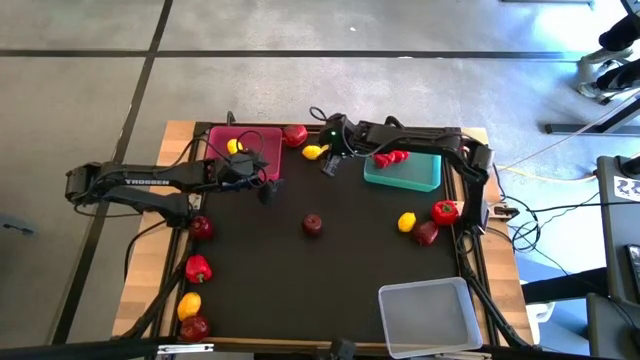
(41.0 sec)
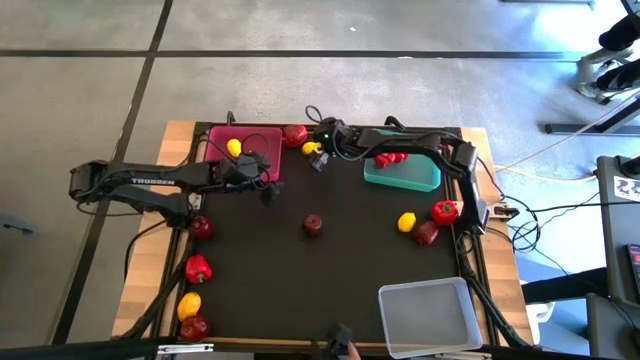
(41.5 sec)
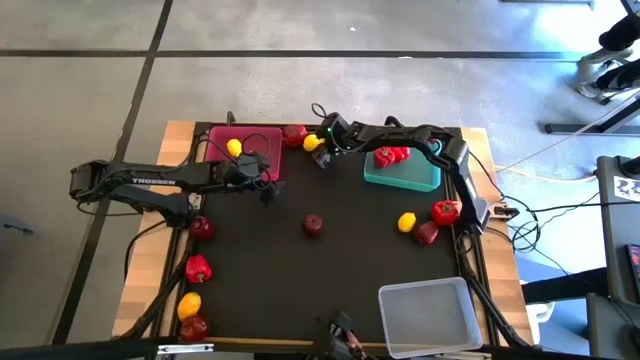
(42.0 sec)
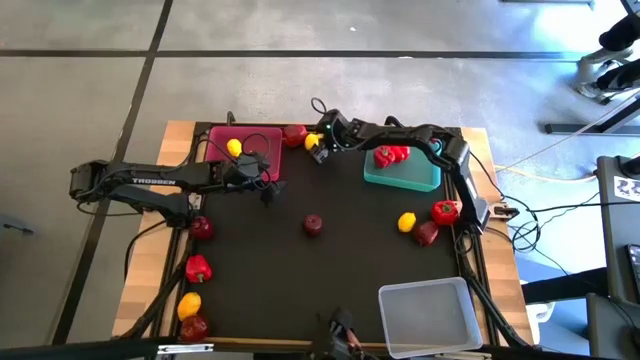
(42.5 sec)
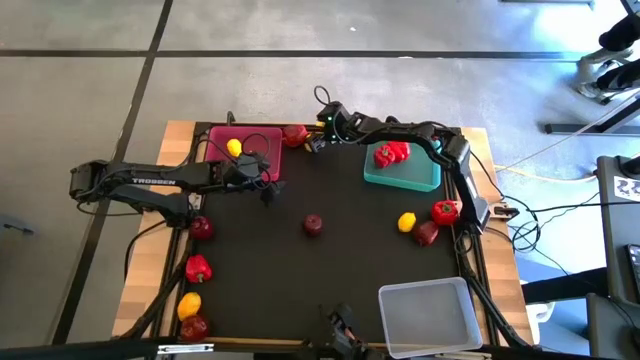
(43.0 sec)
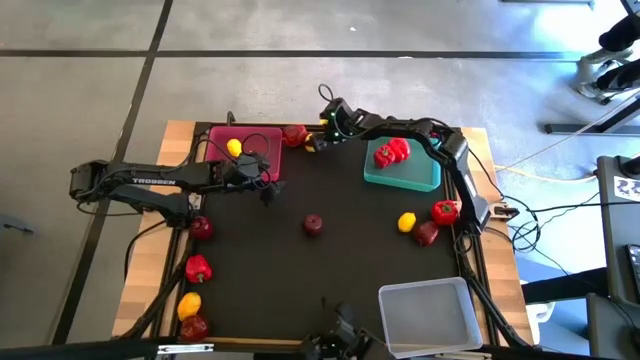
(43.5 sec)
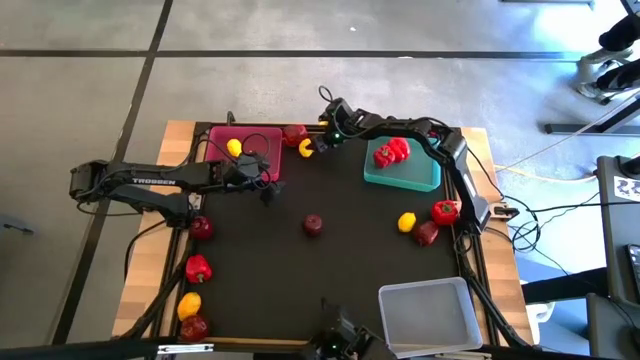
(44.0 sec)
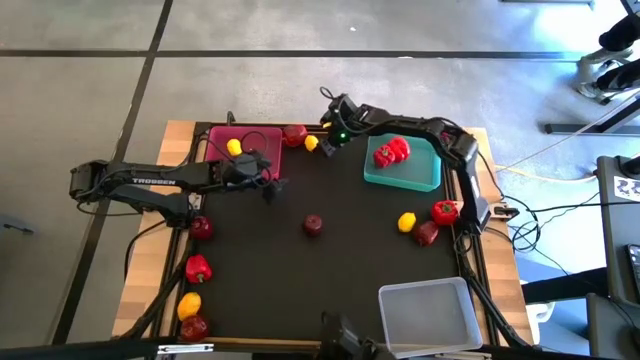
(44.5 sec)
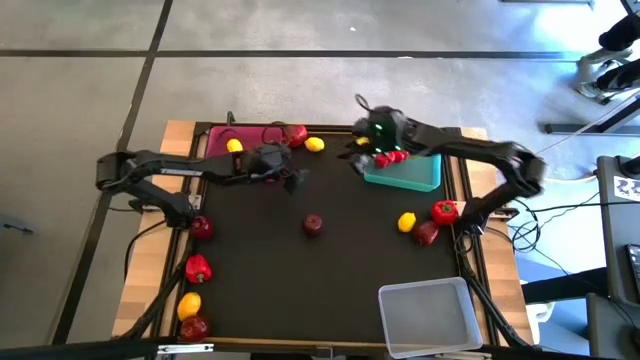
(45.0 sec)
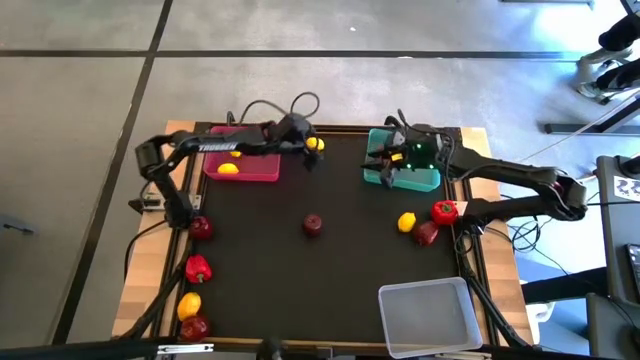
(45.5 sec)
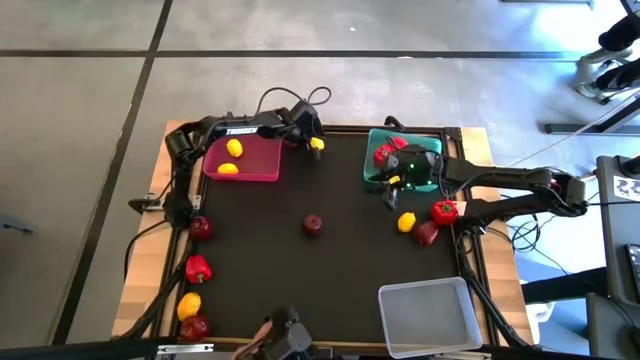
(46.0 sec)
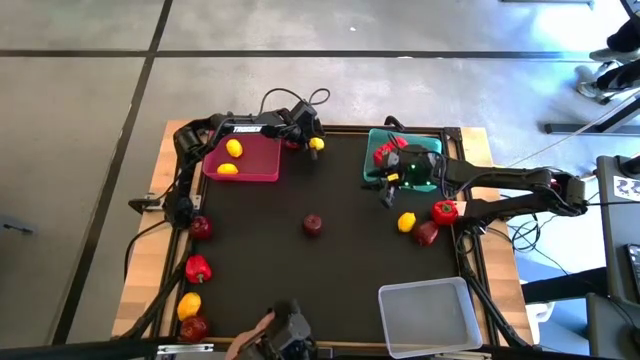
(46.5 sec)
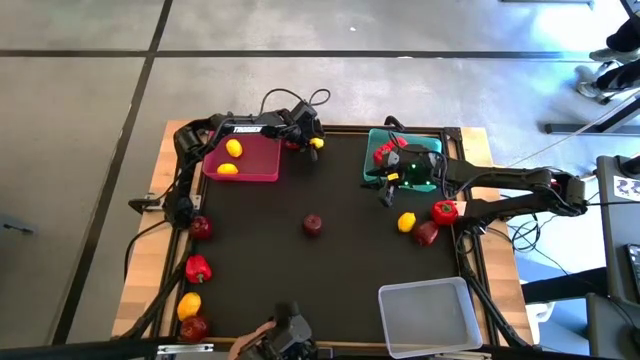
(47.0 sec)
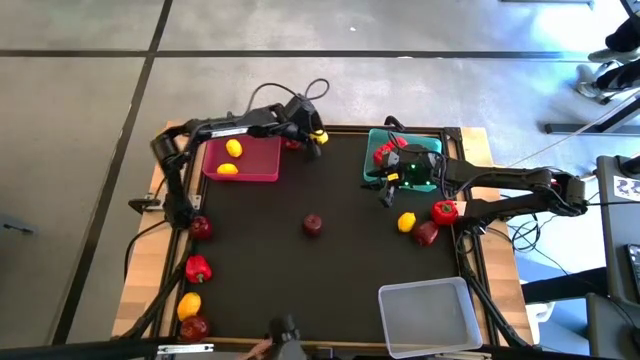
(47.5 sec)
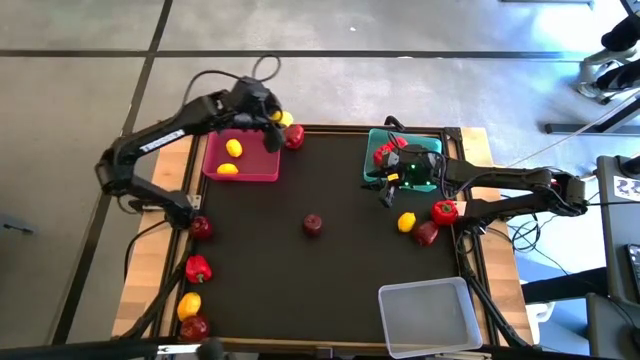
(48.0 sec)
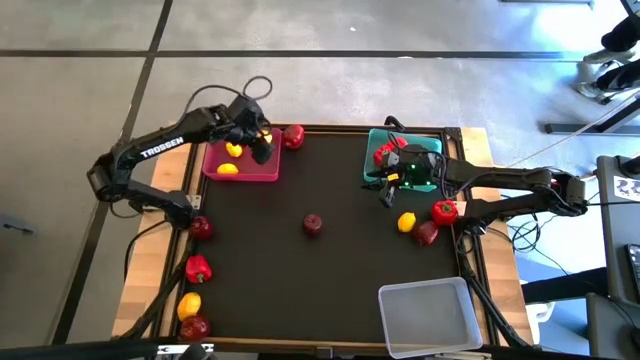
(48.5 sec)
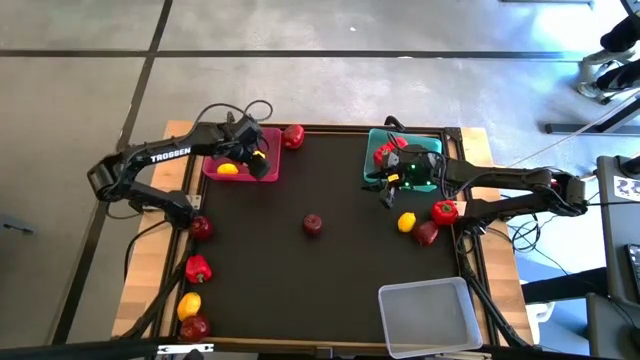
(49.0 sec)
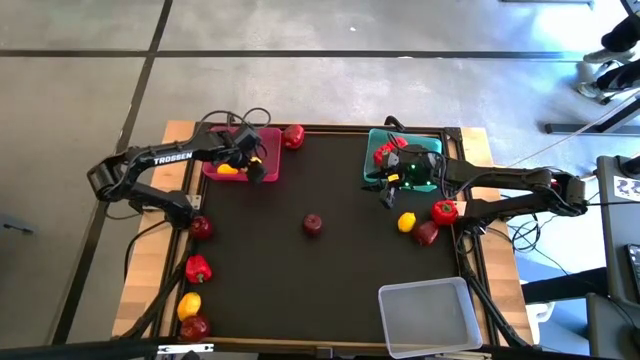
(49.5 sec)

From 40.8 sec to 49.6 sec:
Task: Sort produce into baskets
Put the lemon into the pink bin

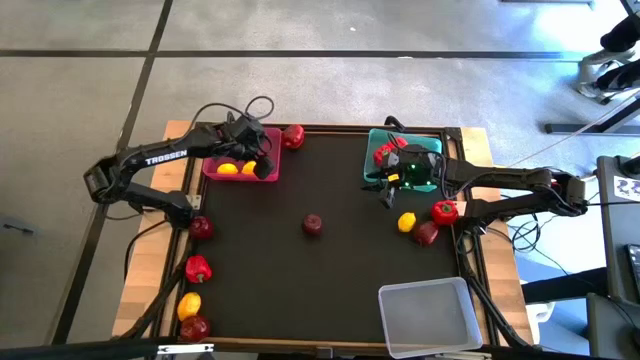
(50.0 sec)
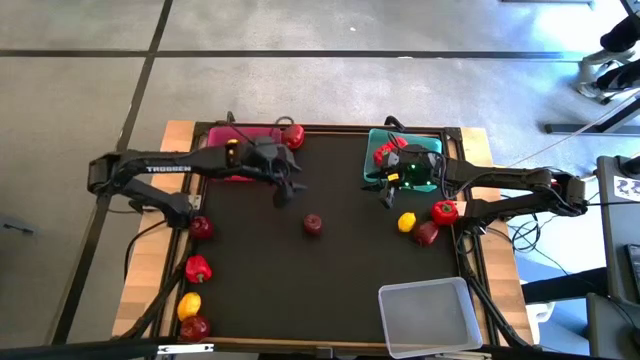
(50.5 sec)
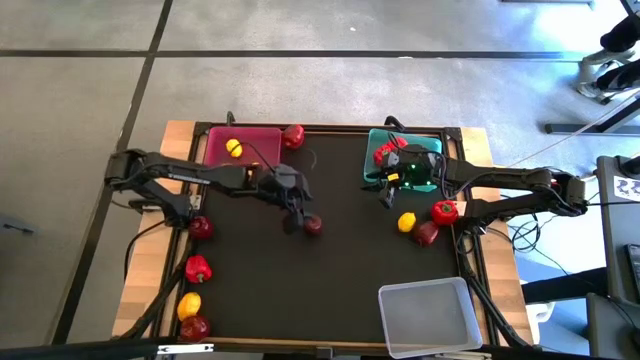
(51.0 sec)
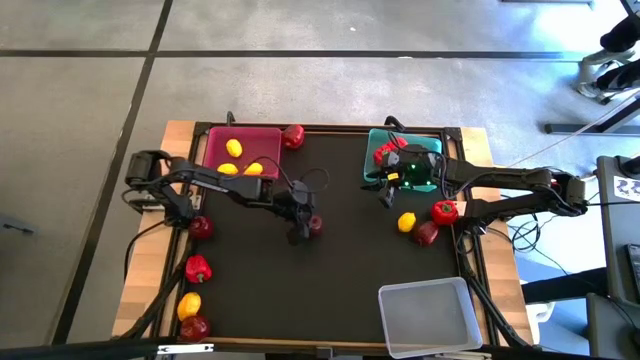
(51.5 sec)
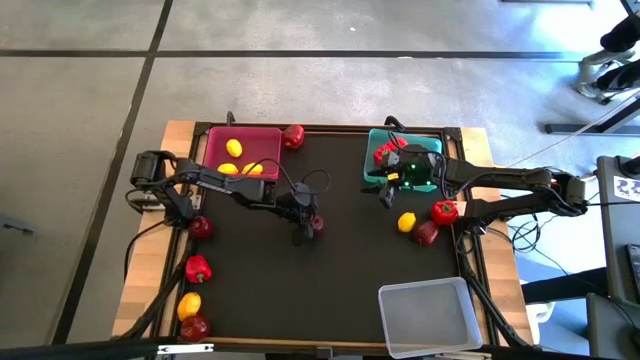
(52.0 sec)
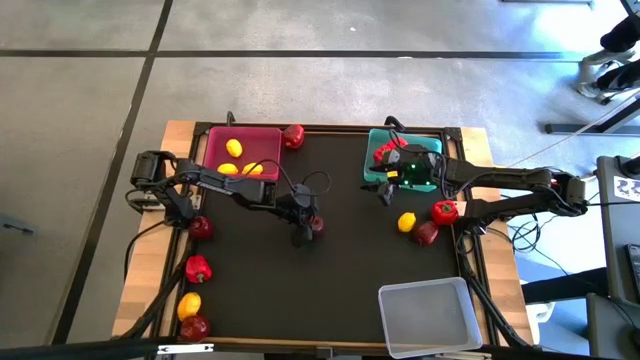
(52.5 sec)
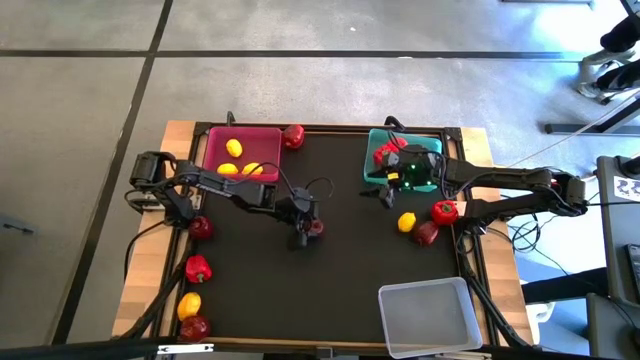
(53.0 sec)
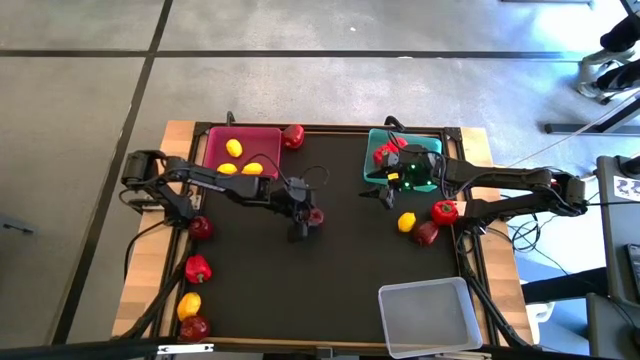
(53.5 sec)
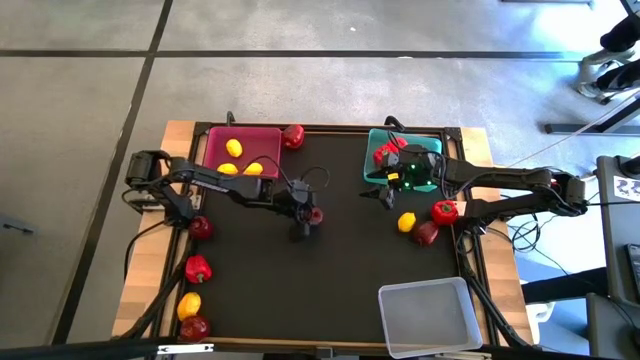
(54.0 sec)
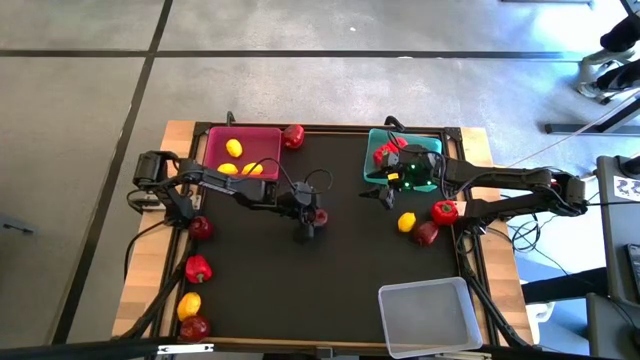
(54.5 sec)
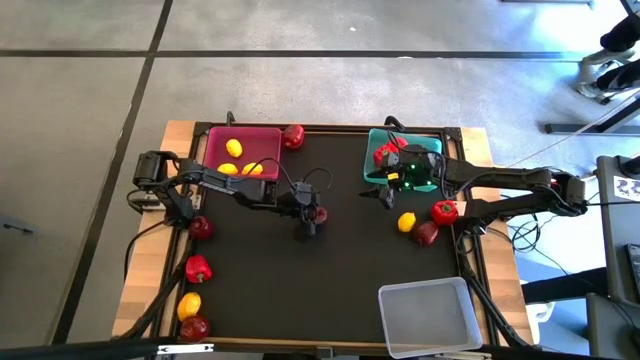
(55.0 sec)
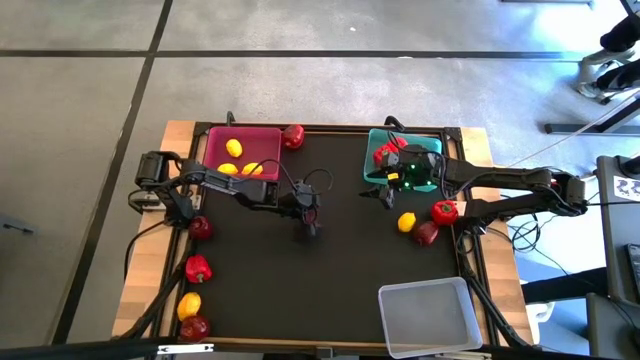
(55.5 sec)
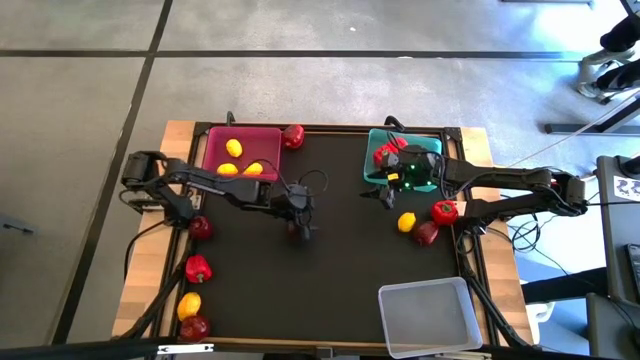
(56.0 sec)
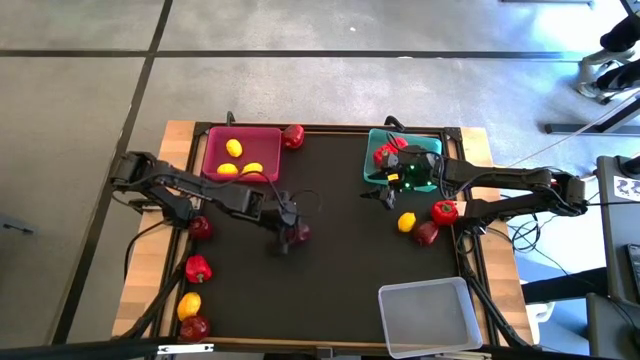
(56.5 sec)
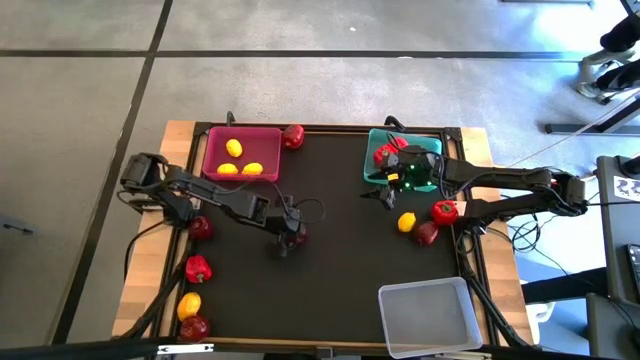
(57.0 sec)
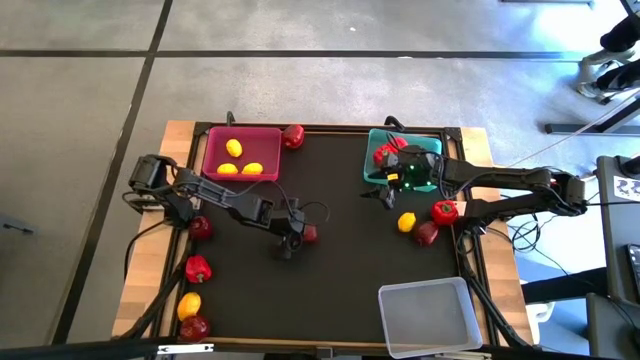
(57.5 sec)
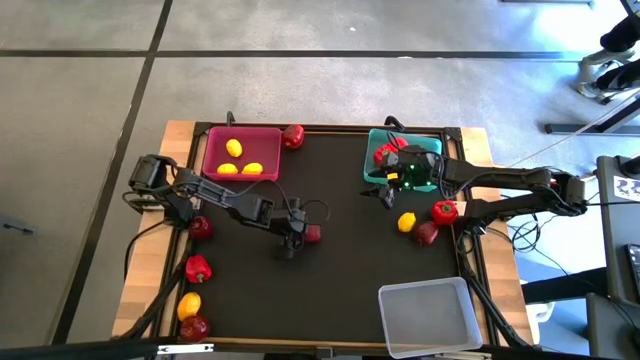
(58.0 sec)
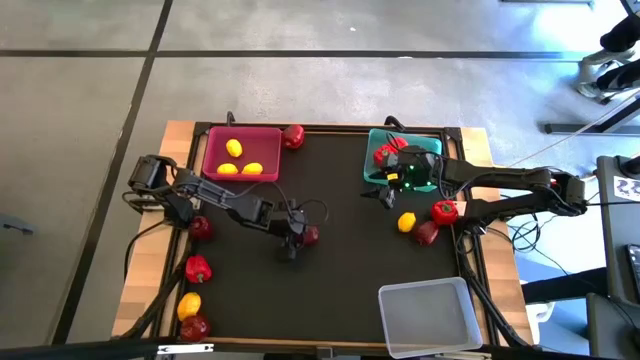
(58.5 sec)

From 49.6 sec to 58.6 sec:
Put the apple into the transparent bin

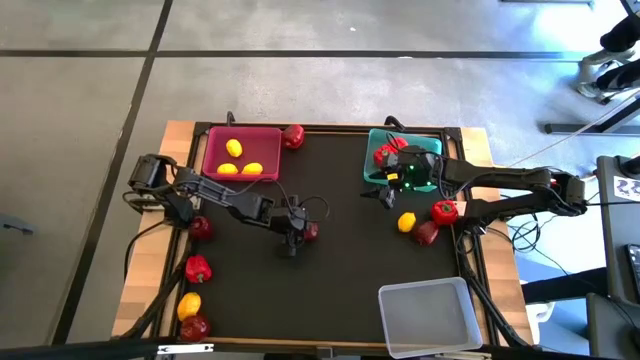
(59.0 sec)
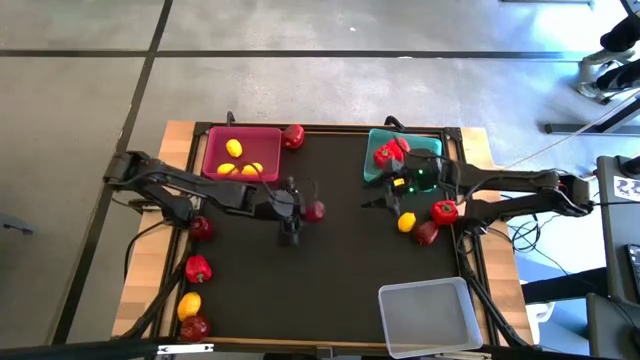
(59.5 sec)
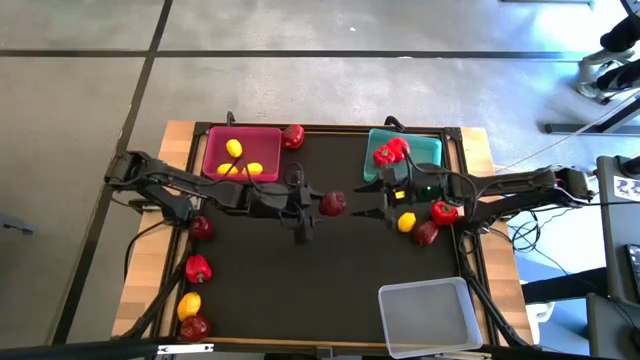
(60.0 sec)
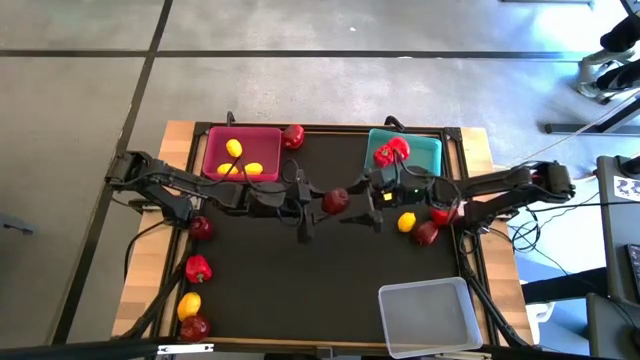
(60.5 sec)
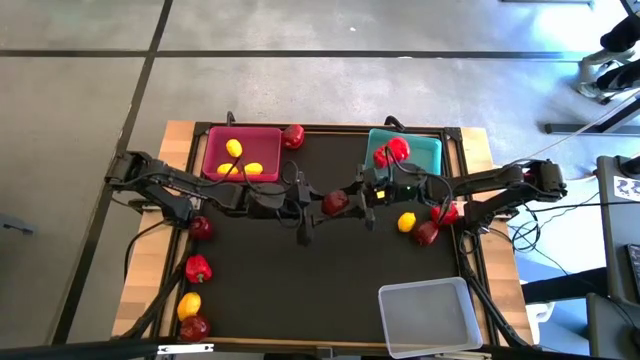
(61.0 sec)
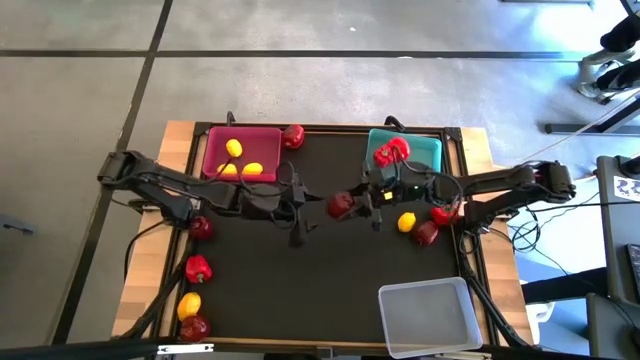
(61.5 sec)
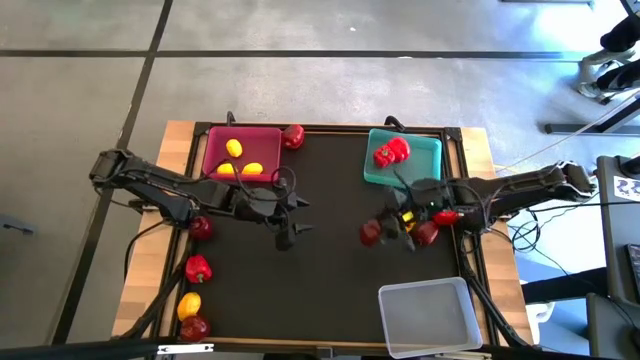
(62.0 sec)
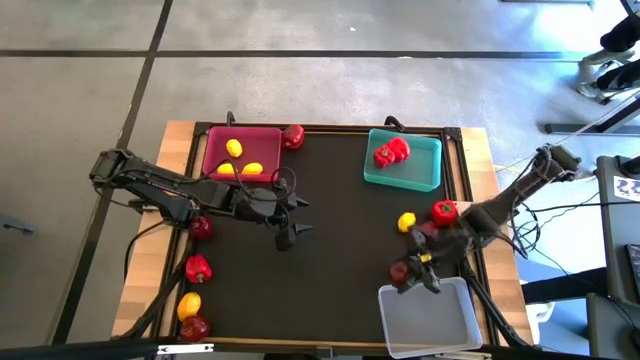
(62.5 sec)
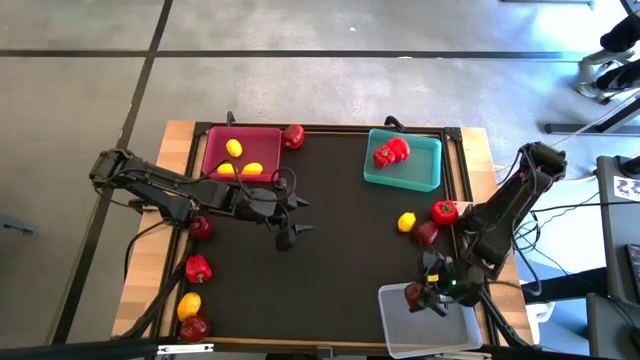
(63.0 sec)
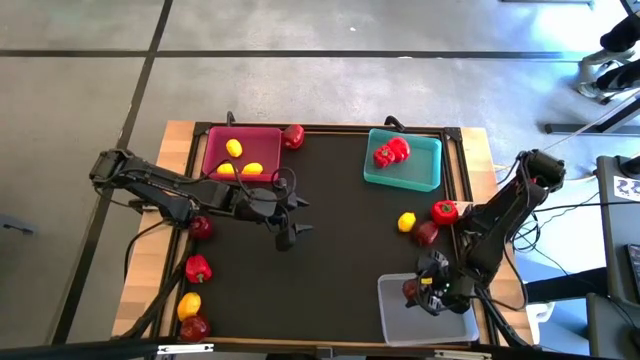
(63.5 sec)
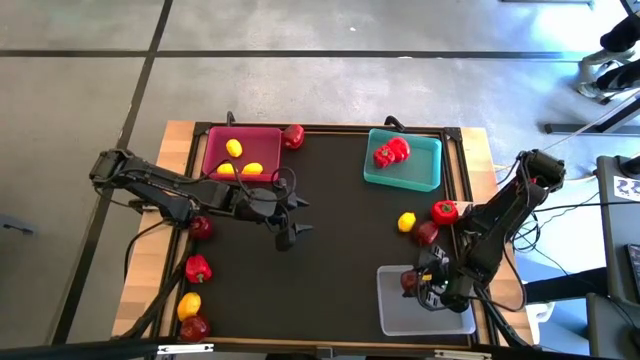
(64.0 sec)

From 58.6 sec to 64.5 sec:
Put the apple into the transparent bin
